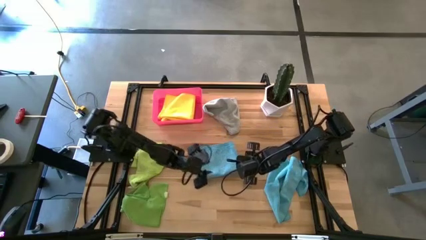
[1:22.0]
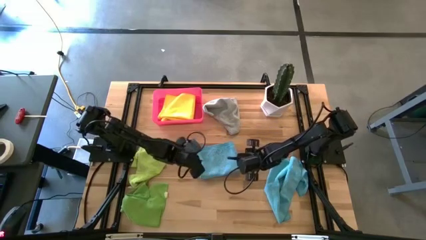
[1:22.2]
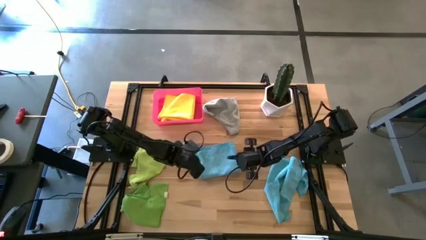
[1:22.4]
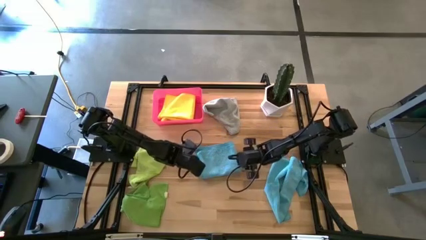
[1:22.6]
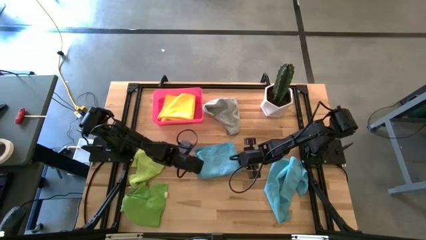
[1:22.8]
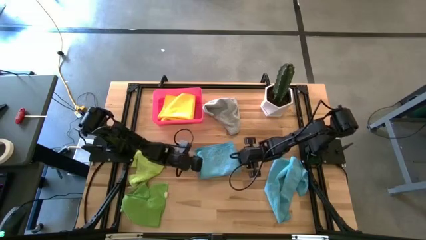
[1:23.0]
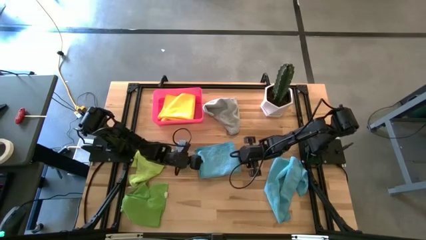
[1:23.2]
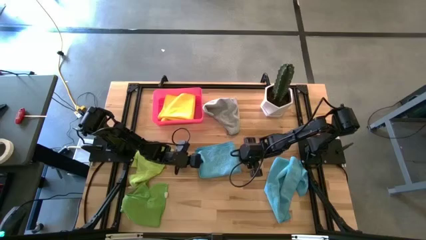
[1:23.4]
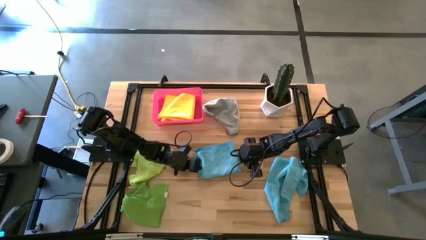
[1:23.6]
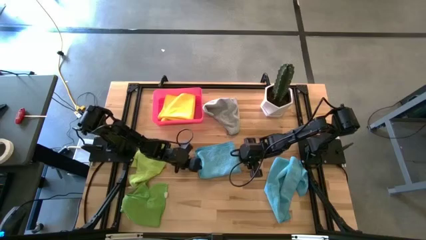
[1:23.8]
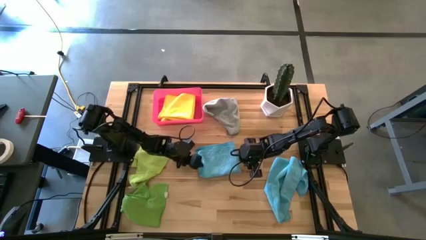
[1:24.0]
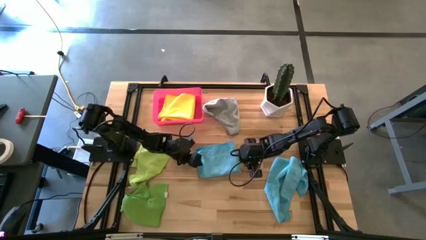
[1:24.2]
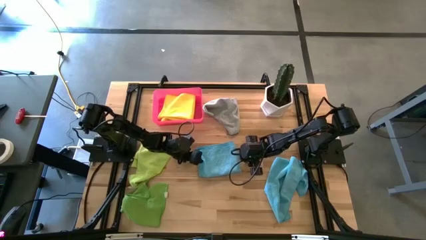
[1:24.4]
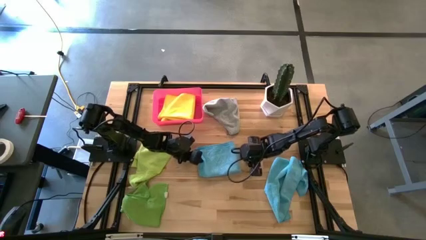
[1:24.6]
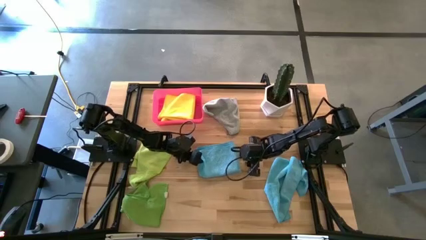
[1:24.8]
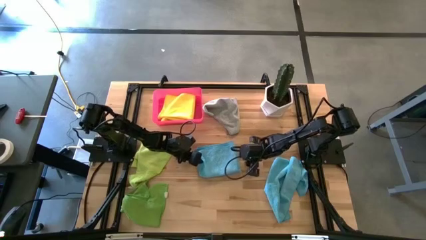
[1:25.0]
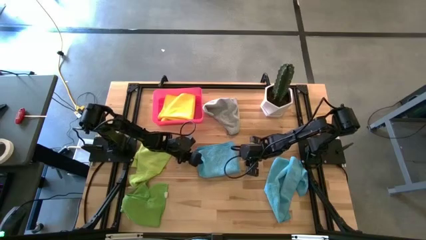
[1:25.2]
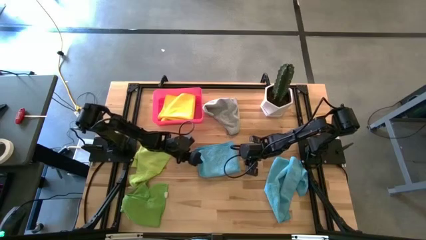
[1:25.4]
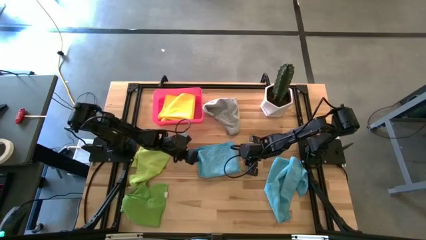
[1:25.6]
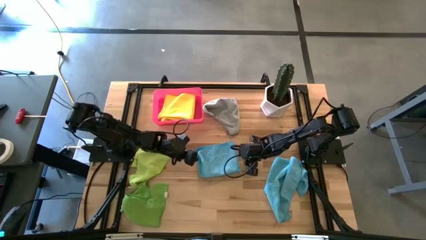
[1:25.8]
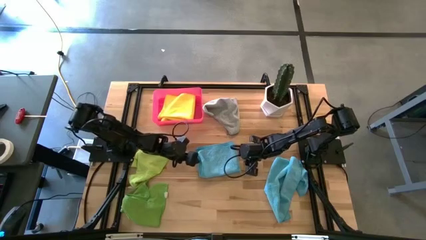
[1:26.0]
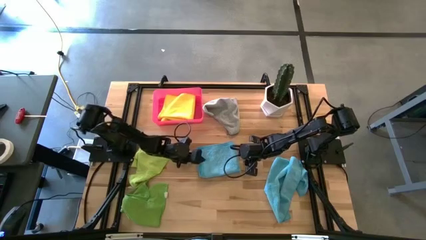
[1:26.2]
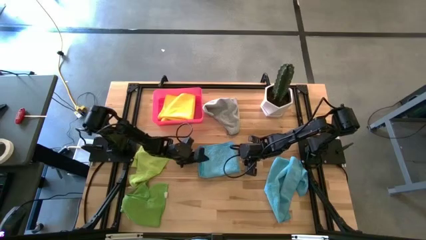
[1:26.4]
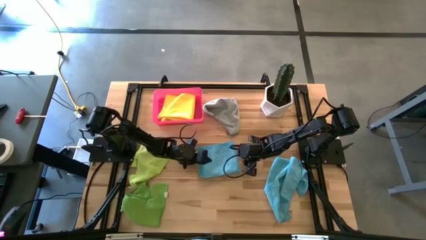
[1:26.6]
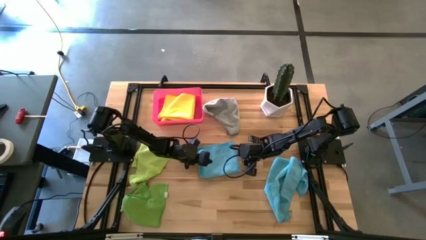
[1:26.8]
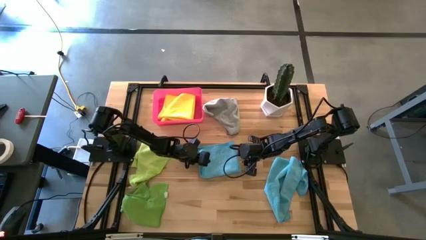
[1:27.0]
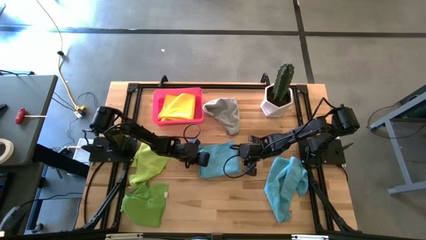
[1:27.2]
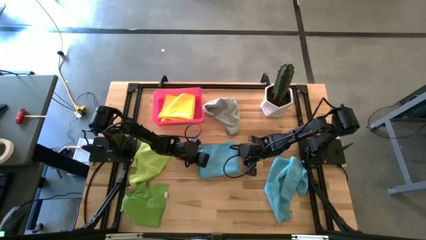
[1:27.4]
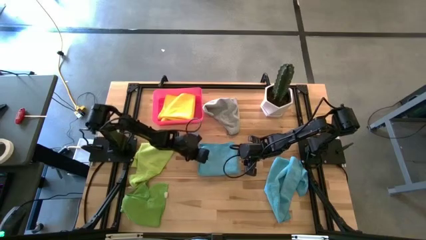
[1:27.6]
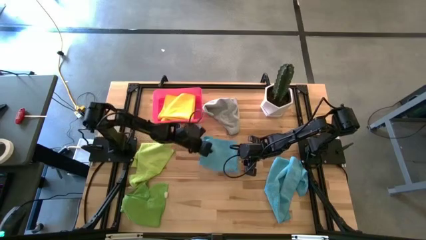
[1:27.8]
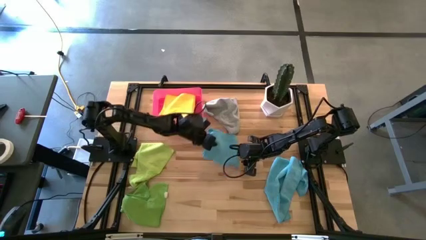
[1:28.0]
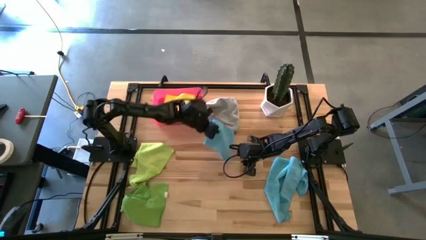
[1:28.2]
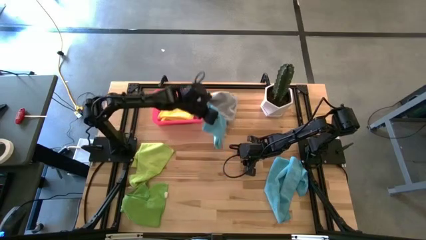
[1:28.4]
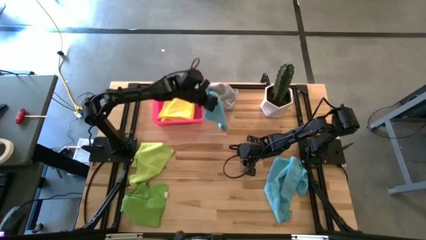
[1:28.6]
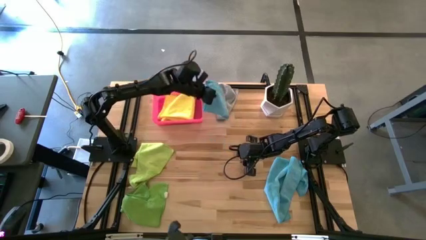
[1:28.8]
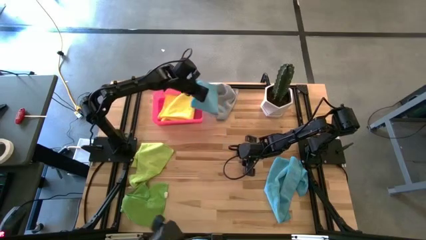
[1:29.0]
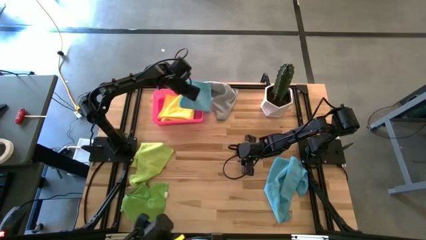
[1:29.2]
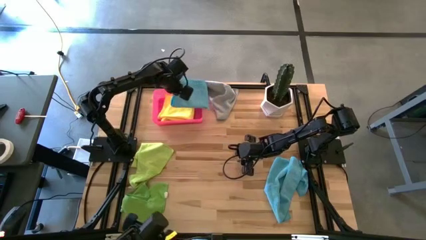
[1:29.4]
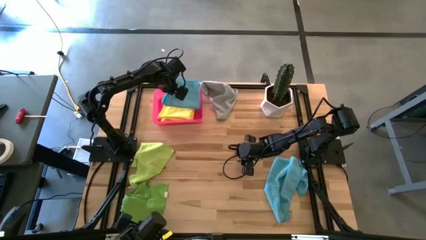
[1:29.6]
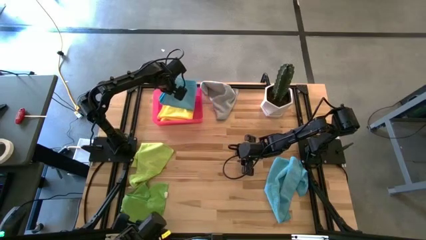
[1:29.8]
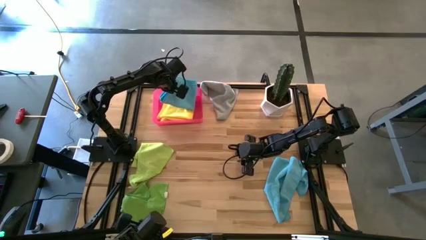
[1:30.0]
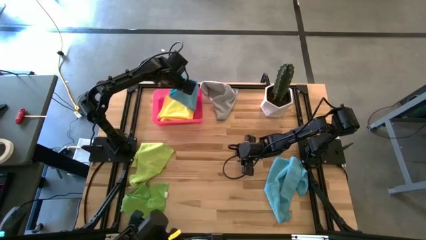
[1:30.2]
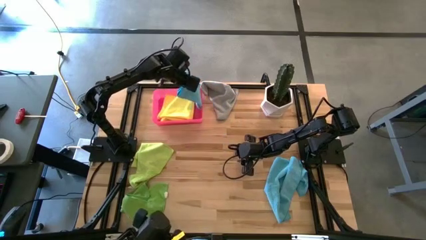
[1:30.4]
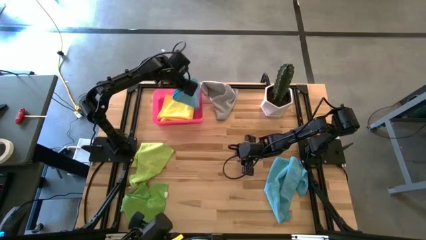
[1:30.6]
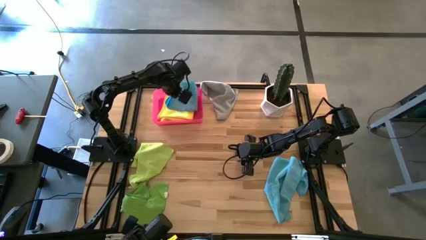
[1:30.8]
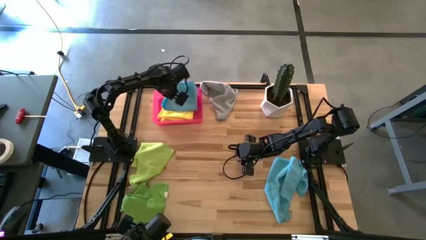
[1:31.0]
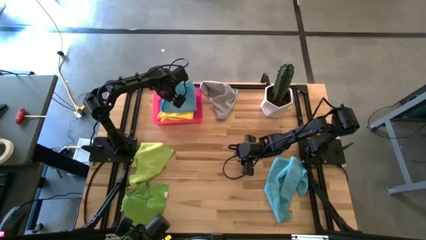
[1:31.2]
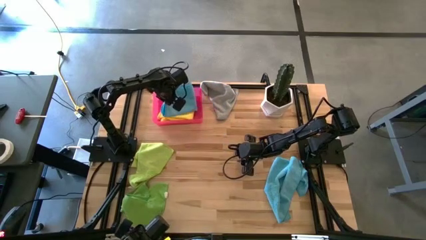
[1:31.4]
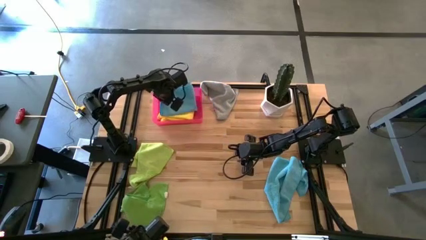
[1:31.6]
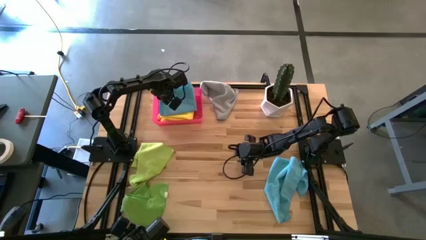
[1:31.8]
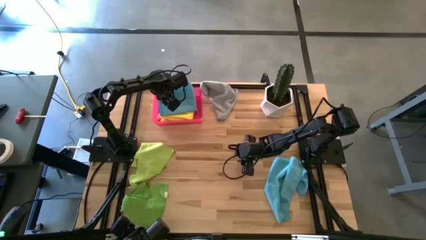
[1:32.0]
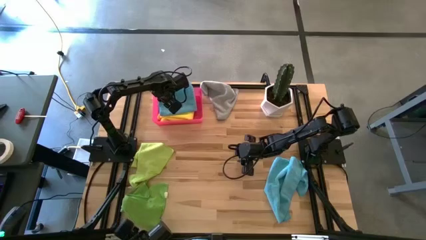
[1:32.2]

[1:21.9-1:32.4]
Task: Fold microfiber towels
Put the top blue towel into the bin

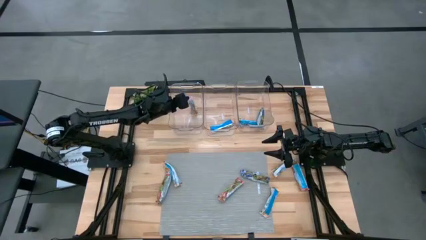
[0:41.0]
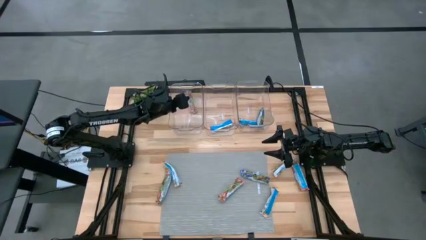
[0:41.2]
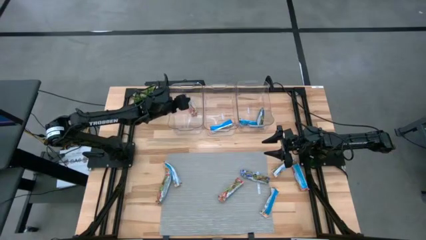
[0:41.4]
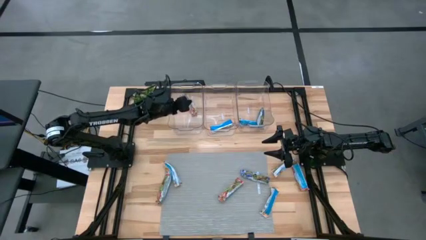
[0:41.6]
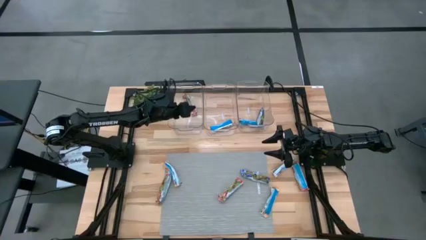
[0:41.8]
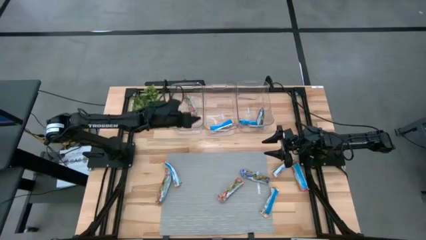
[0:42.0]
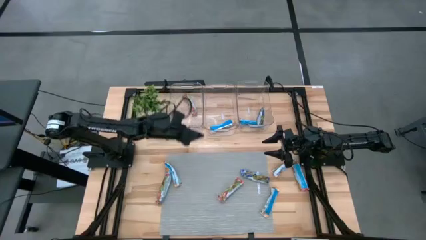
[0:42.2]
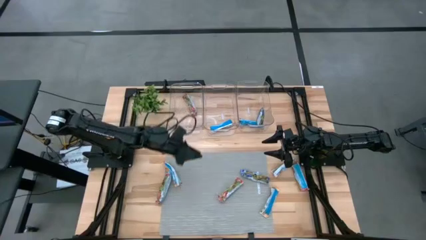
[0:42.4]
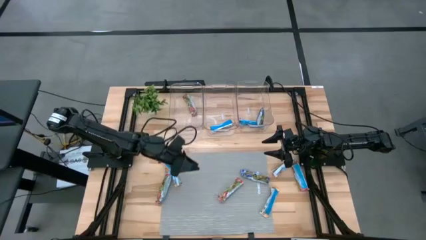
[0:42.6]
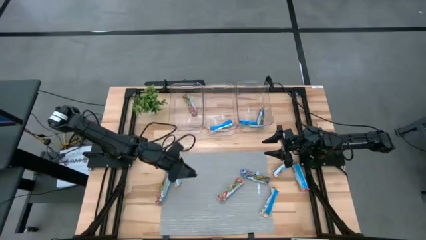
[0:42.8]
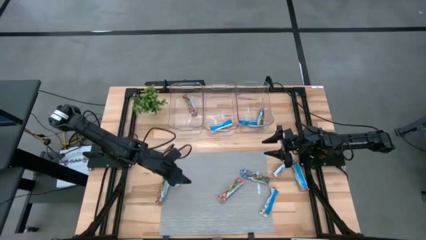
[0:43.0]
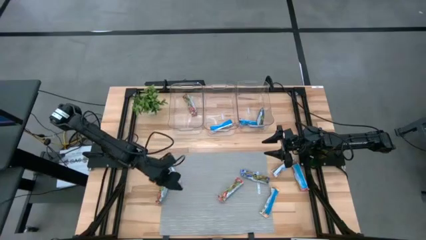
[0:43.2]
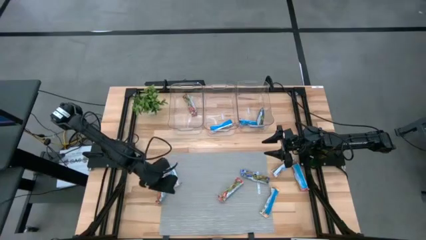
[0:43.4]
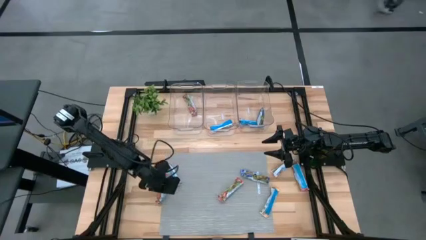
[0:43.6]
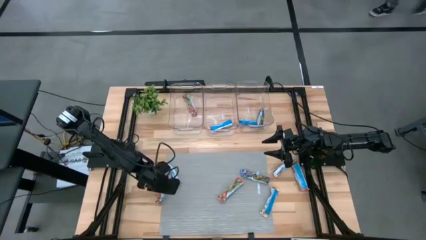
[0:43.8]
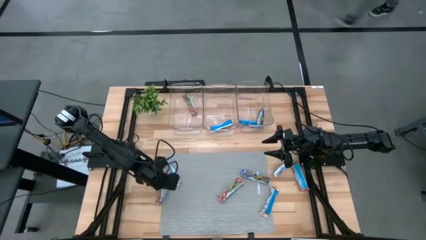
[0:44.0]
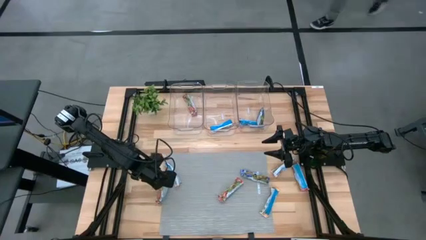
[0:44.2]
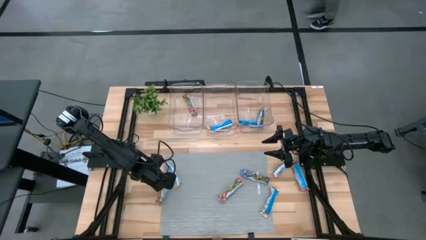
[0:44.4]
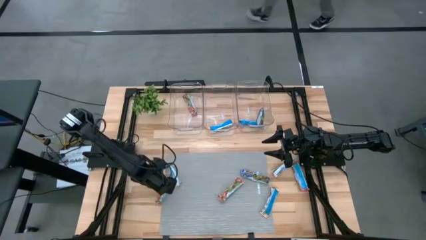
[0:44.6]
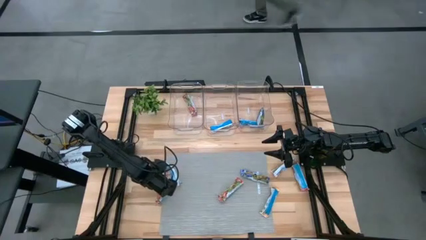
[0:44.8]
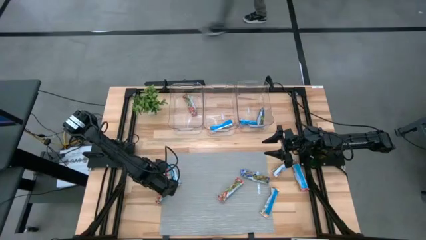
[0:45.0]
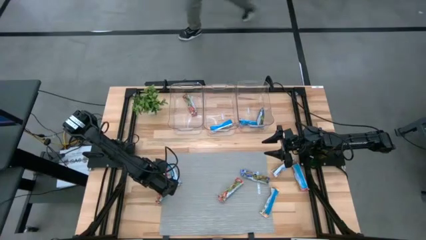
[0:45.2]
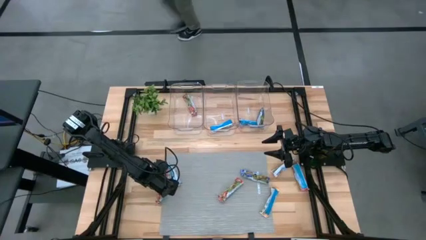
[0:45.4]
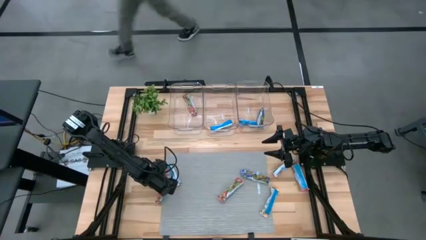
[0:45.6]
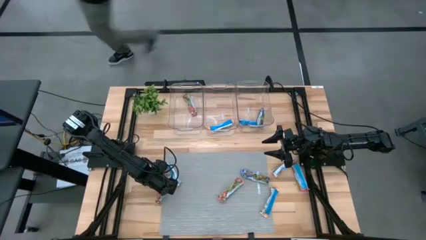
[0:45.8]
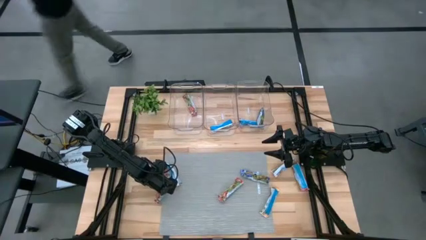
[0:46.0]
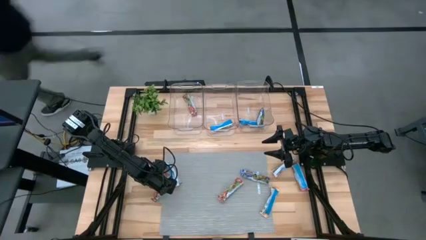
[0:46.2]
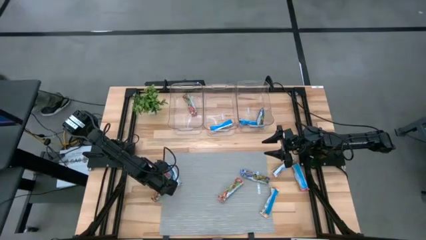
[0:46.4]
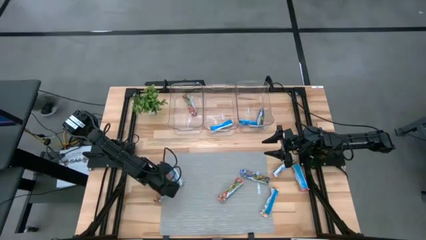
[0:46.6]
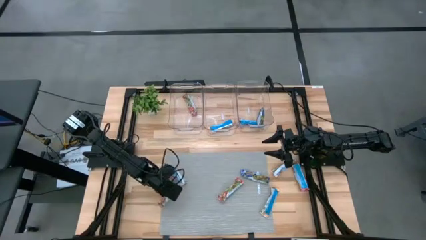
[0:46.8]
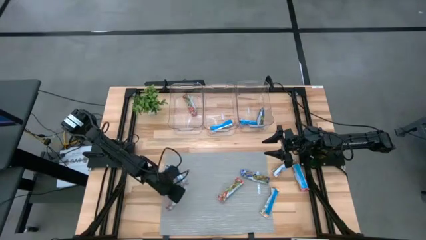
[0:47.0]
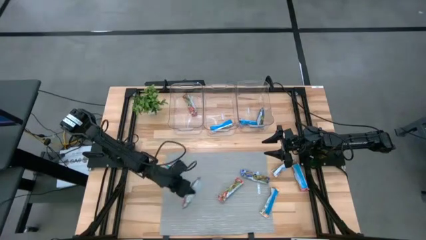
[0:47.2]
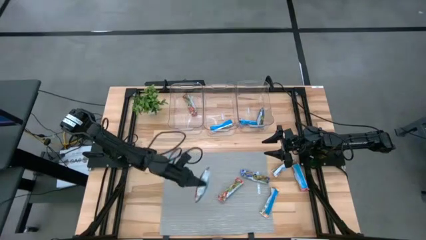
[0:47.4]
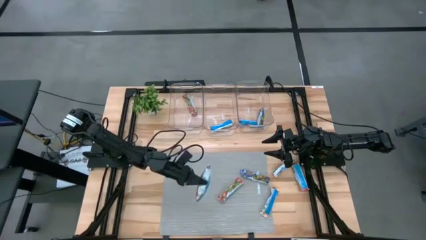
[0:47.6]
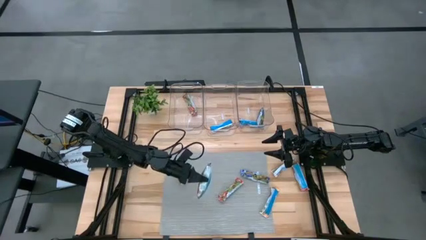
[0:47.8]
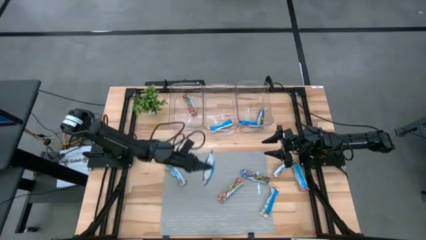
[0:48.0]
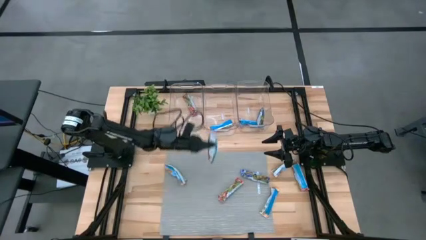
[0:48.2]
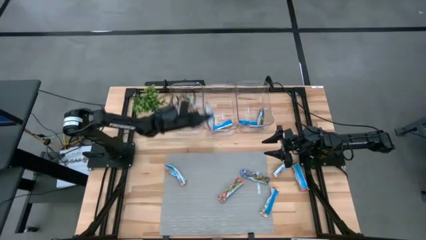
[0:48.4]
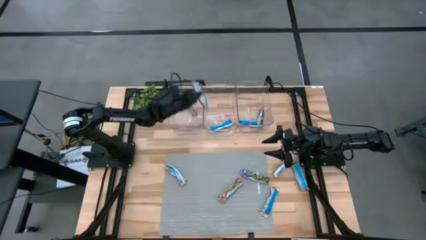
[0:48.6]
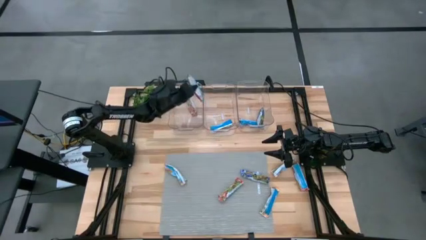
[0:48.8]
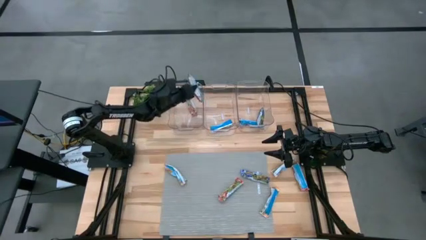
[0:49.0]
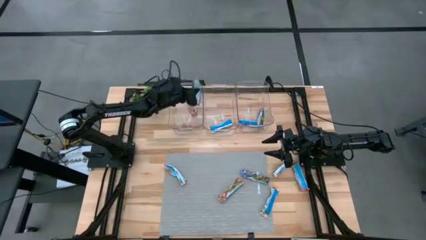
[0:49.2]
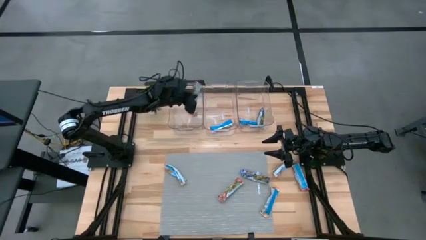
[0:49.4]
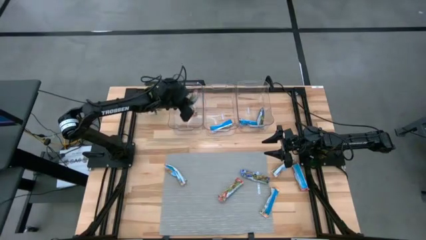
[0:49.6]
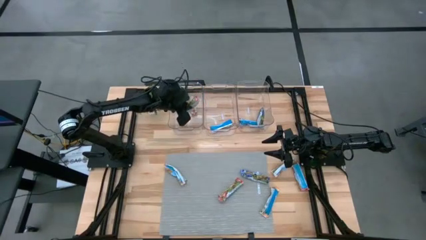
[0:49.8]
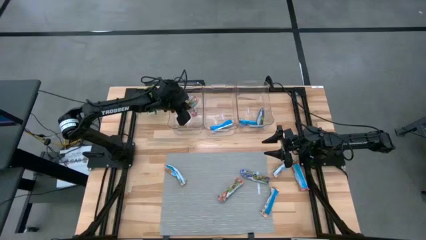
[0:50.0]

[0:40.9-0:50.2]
Task: Pick and place Granola Bars by type
Put the red granola bar into the left transparent bin
